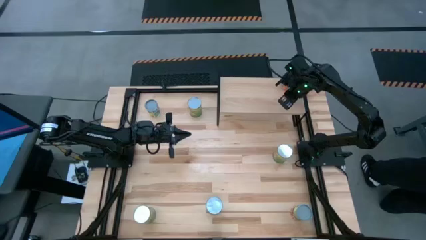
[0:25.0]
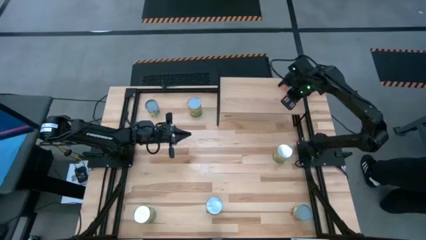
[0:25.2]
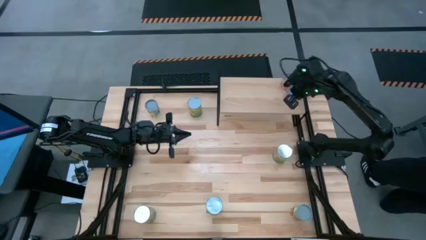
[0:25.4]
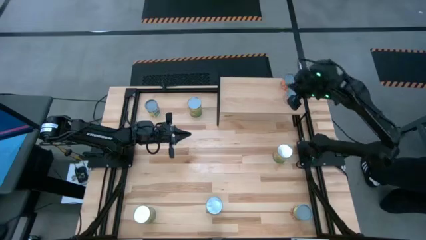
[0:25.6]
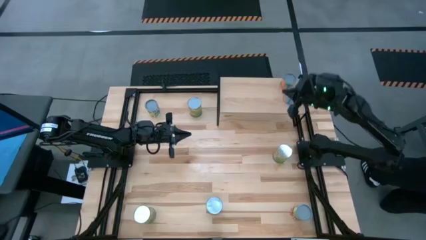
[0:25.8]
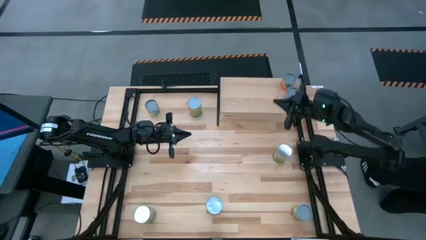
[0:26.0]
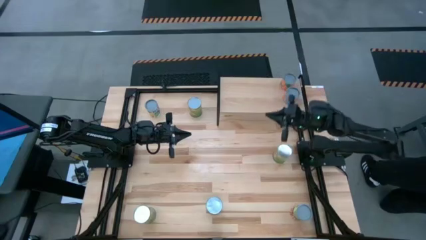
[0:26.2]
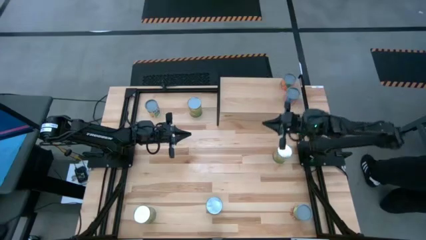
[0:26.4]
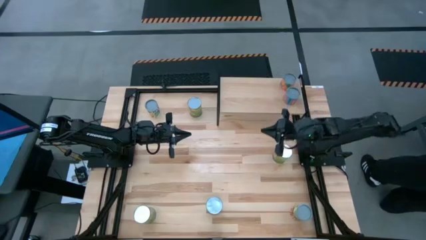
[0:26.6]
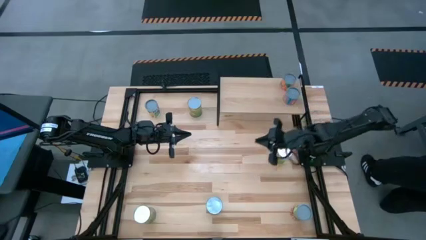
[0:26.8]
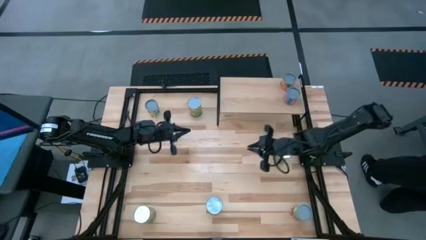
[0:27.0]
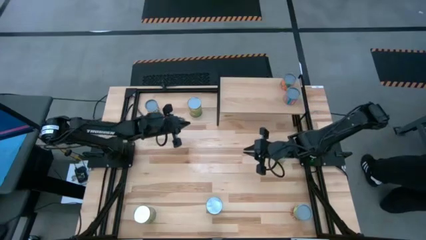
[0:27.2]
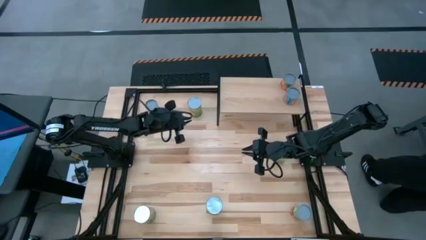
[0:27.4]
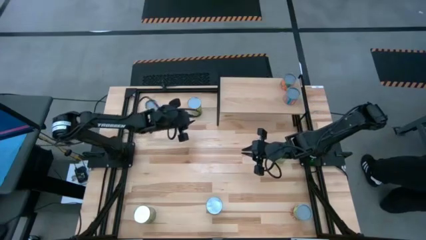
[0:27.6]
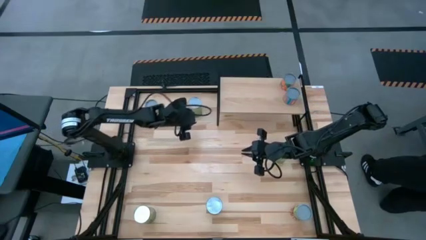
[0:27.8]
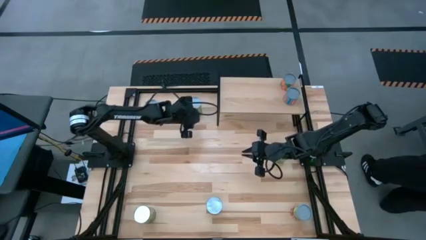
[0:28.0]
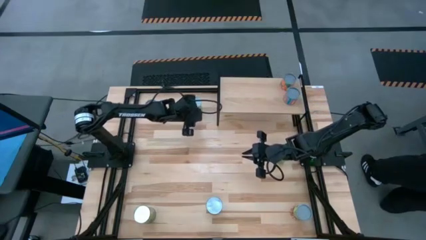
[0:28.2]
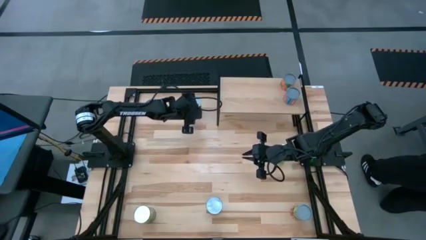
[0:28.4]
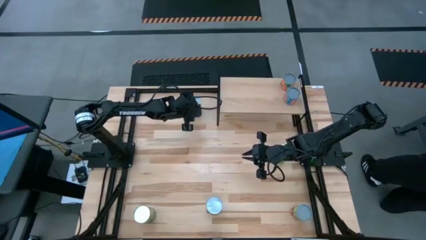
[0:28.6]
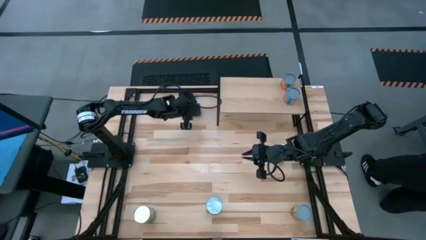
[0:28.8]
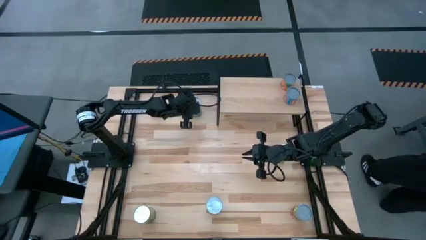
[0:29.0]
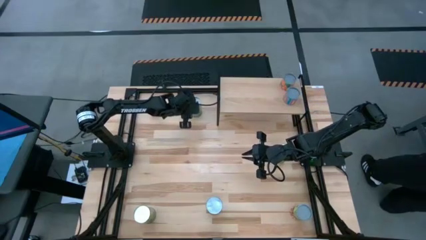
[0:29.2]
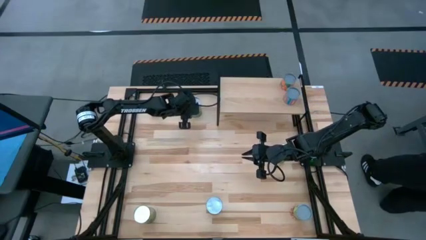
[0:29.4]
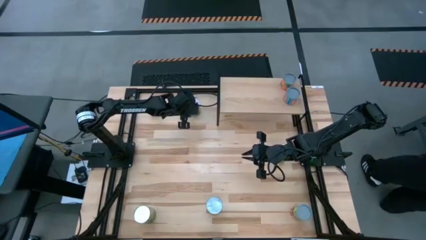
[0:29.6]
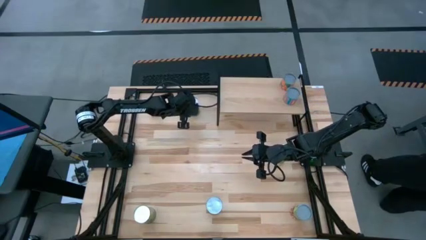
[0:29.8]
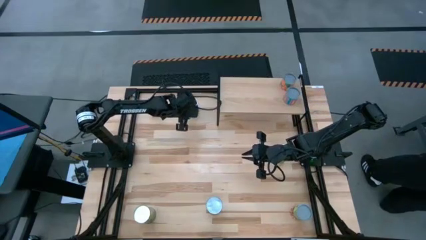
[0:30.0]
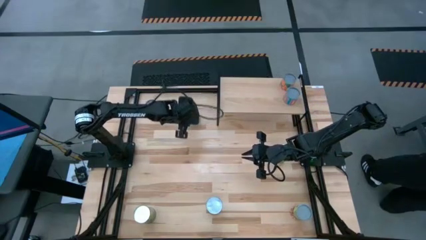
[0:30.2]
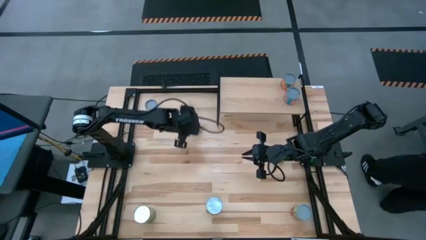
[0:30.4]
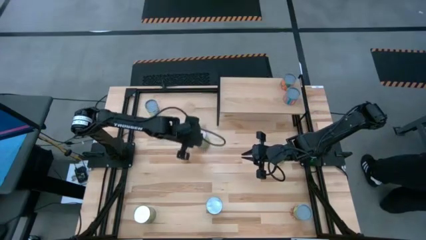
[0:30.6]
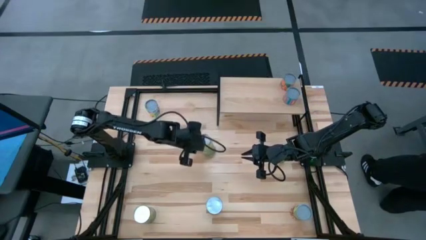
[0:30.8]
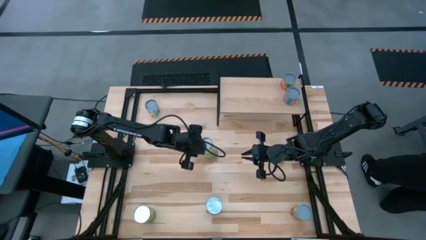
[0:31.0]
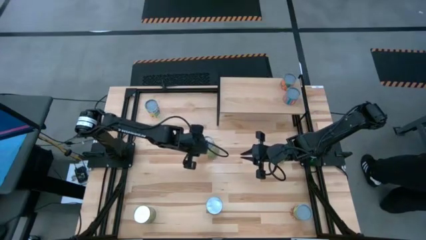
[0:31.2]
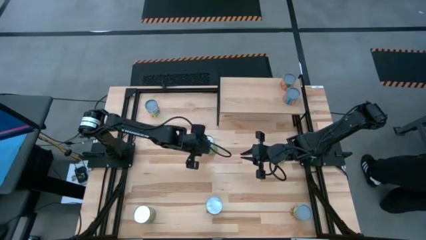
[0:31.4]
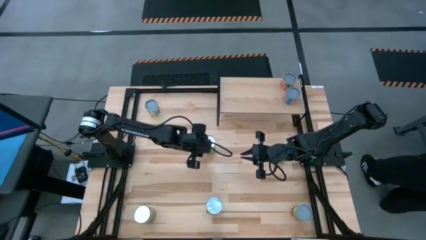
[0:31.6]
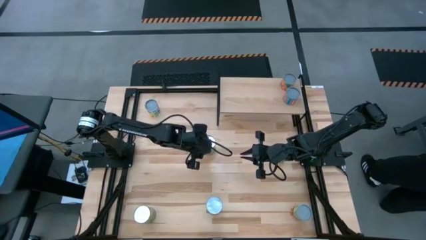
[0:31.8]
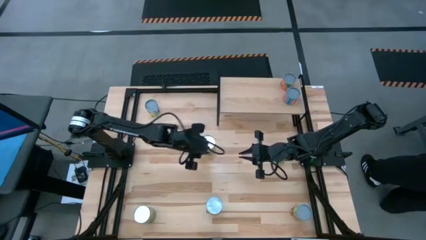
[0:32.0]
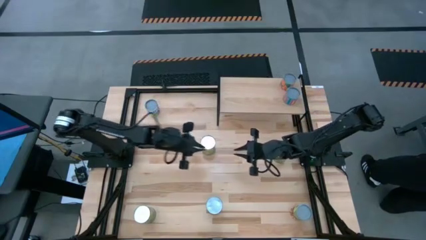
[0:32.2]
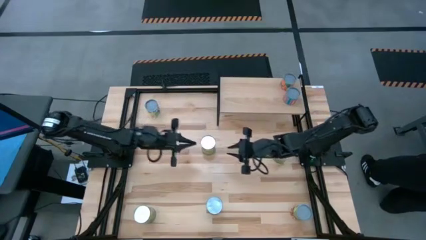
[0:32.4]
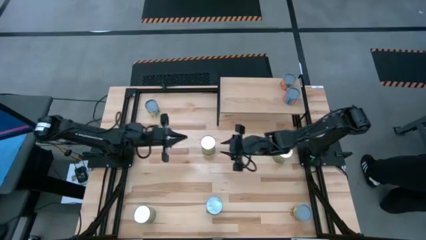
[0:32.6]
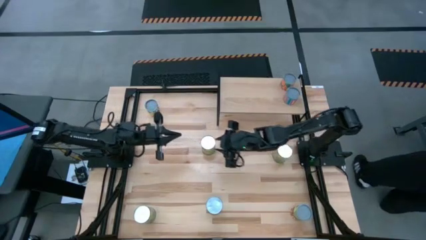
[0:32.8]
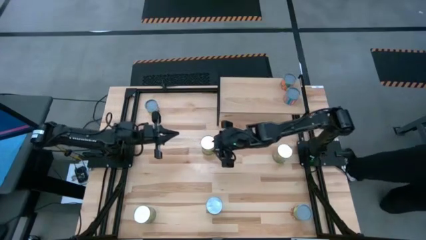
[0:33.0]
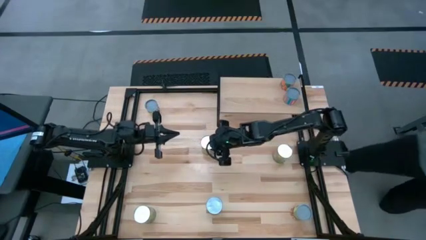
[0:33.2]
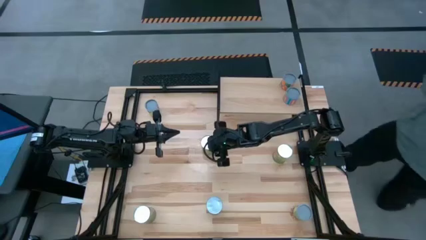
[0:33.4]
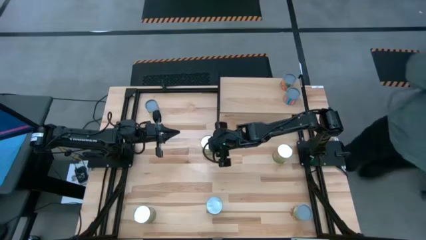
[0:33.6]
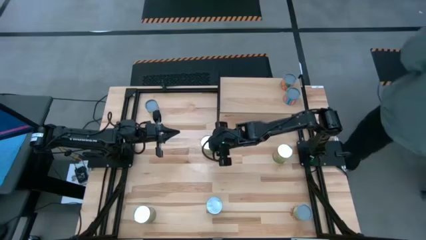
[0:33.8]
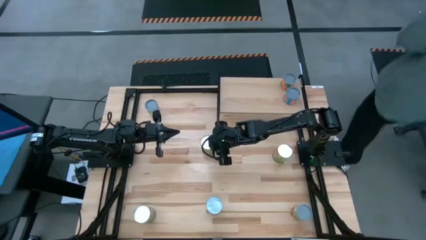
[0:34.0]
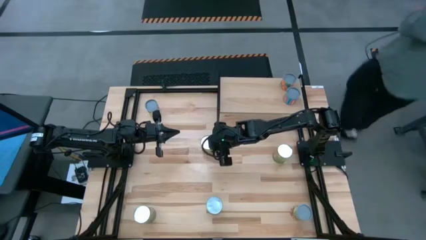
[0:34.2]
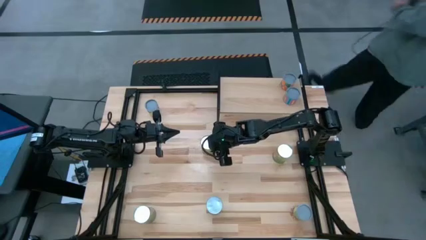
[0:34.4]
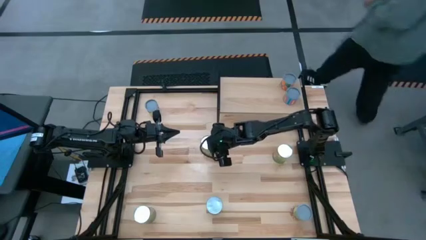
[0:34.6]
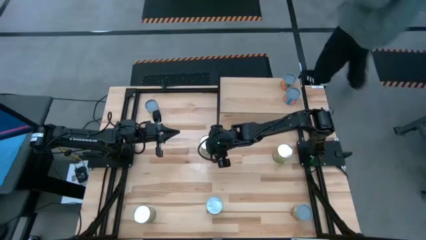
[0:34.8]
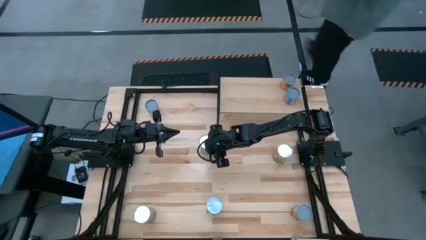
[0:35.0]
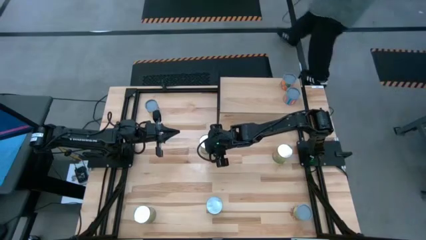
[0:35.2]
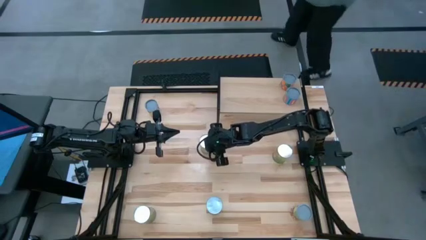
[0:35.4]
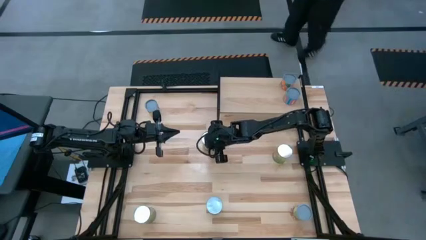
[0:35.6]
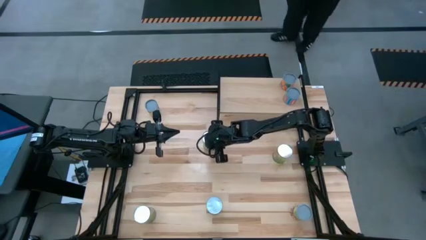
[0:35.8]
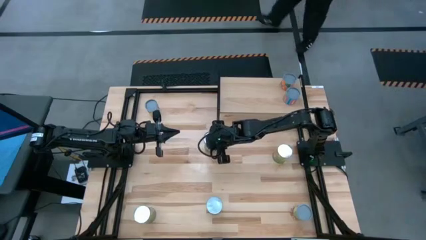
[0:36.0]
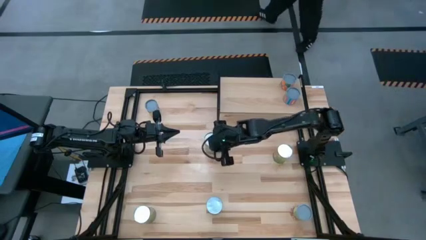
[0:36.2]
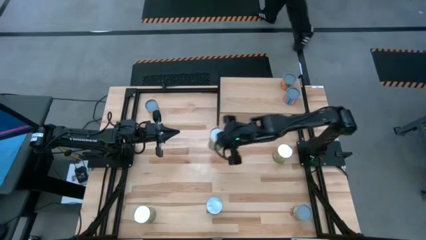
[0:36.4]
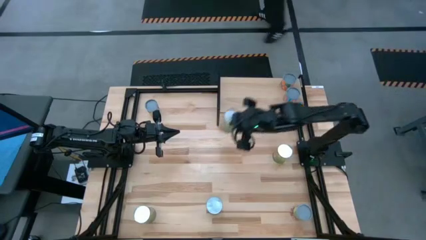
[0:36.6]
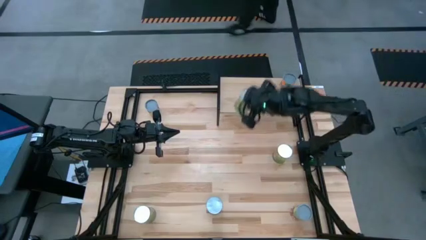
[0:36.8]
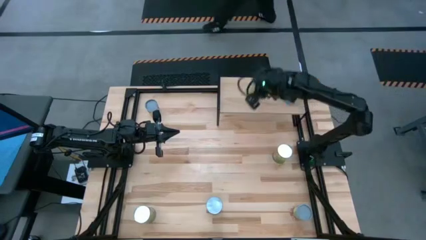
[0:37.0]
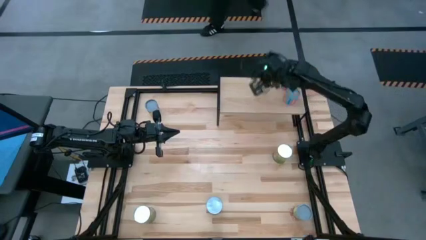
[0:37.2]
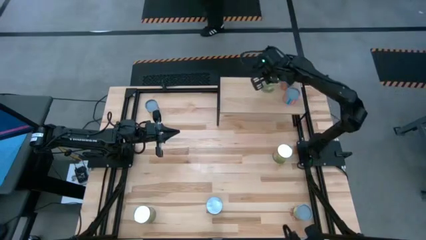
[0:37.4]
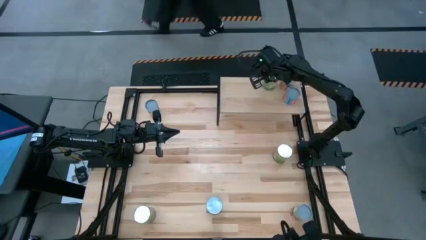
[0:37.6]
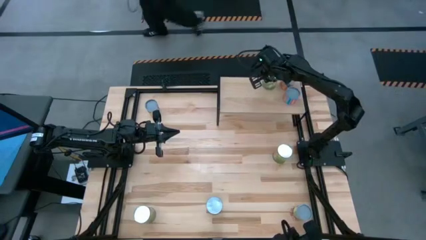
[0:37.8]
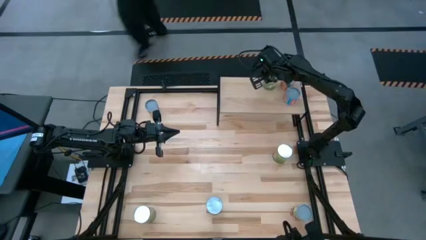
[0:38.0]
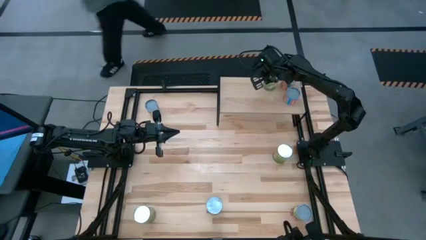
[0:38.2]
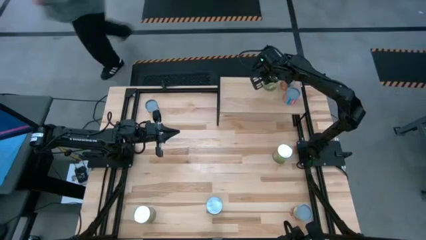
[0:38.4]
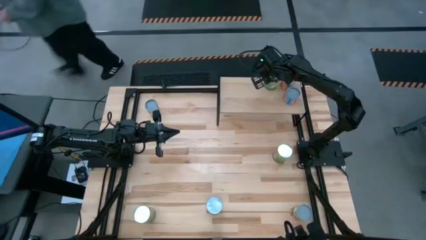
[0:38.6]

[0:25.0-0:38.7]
Task: Pick and place cans onto a shelf
Put the top canned pears on the shelf

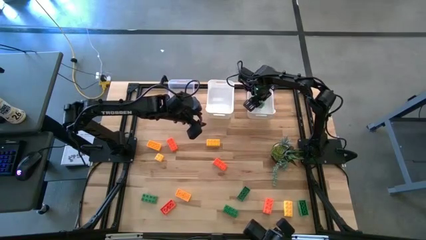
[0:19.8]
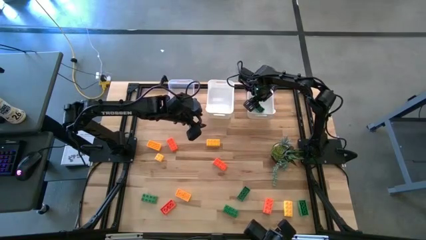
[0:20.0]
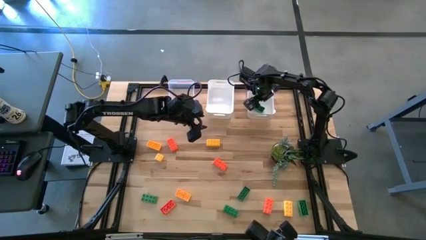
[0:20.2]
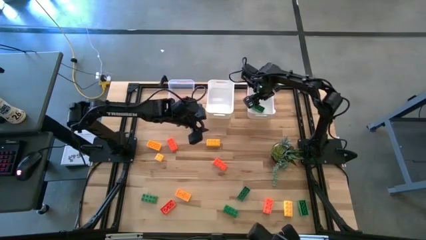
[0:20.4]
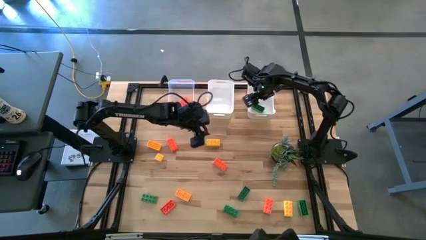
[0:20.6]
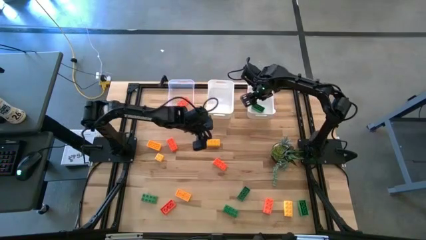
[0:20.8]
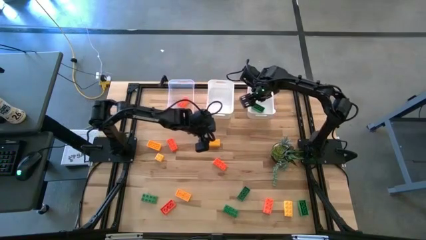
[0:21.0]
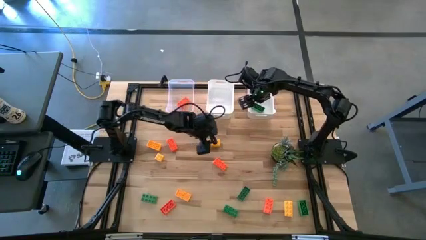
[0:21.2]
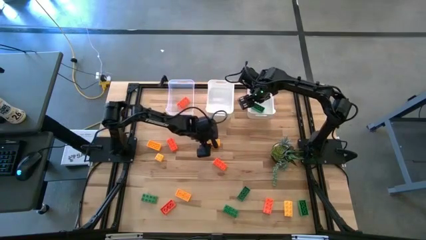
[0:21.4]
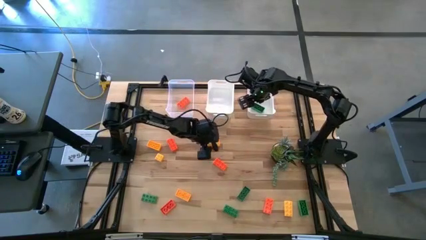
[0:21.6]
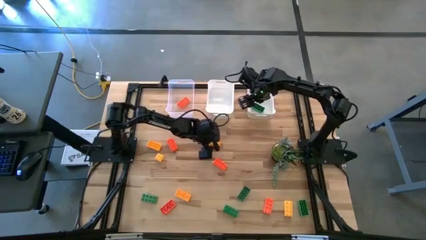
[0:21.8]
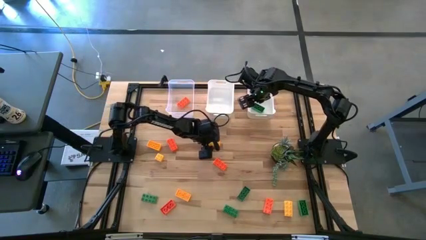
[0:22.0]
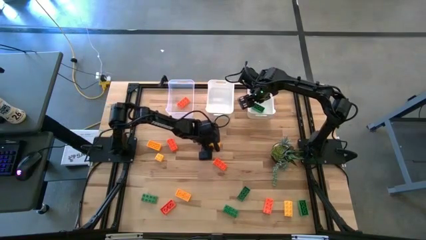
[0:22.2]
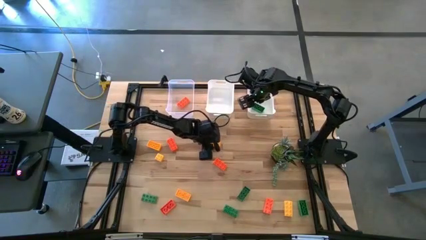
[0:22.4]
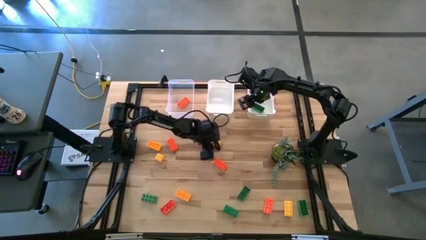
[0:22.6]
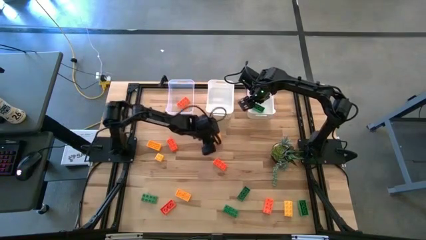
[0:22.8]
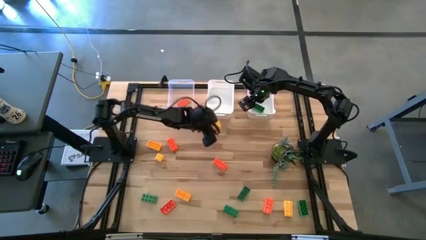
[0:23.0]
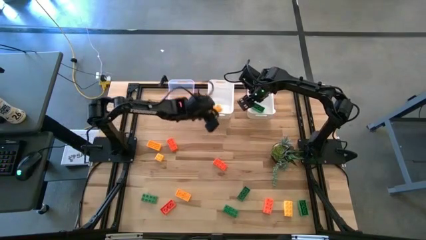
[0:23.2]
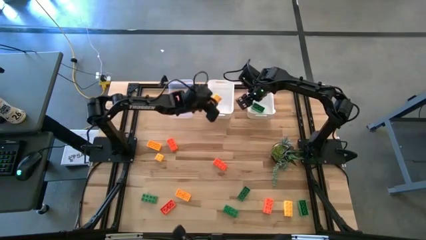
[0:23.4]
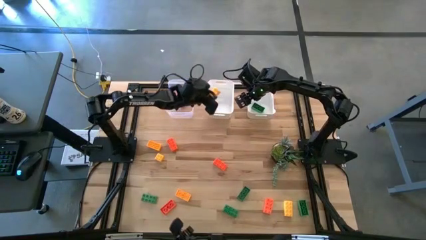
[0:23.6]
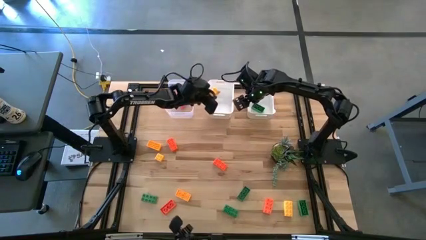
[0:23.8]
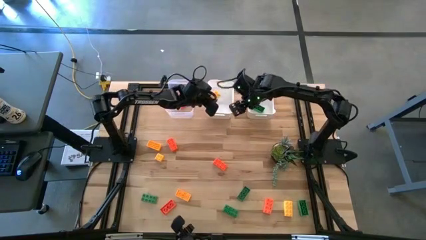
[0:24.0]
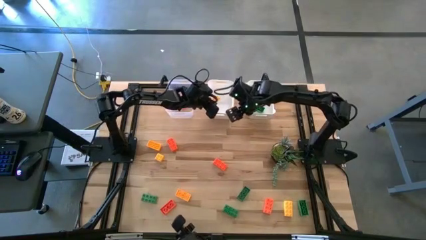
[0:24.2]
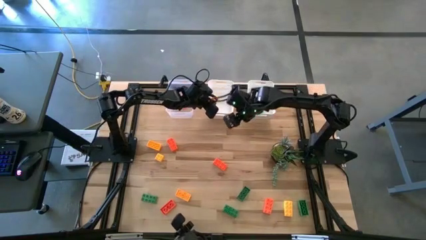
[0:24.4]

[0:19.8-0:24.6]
Task: Sort & place blocks by color
Put the yellow game piece into the left white bin
